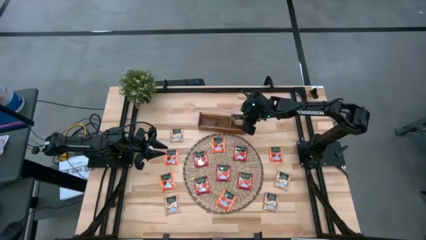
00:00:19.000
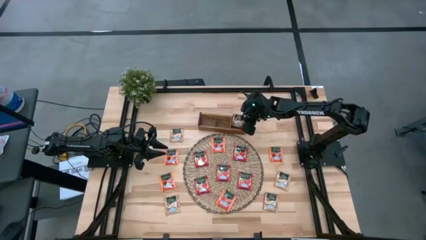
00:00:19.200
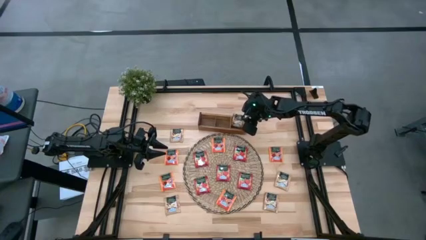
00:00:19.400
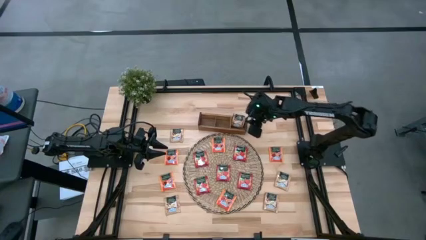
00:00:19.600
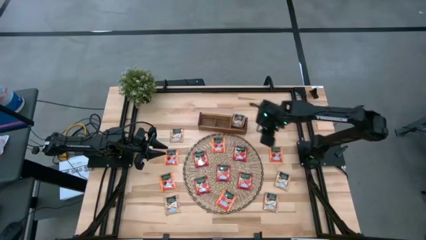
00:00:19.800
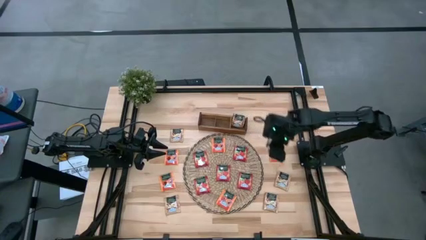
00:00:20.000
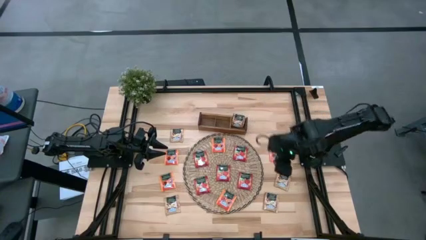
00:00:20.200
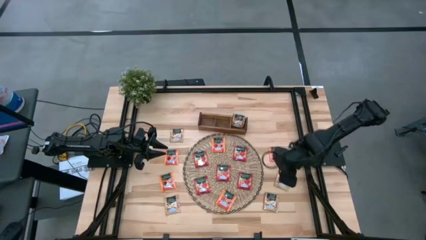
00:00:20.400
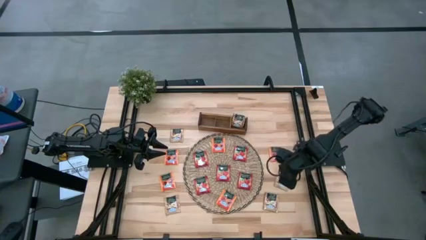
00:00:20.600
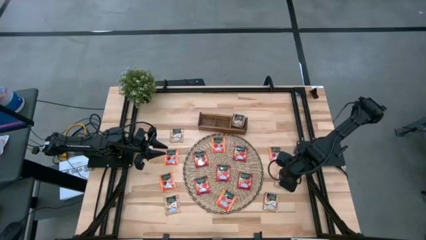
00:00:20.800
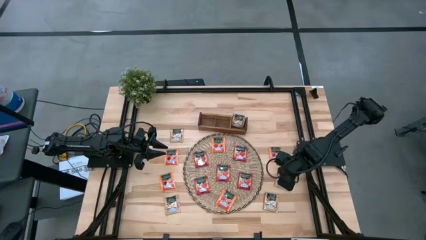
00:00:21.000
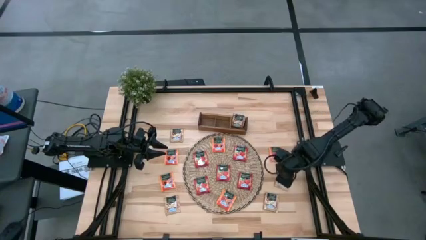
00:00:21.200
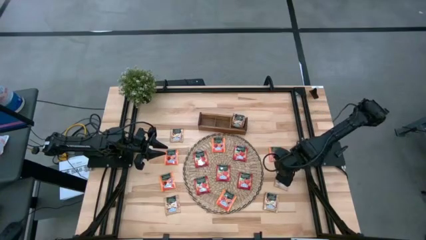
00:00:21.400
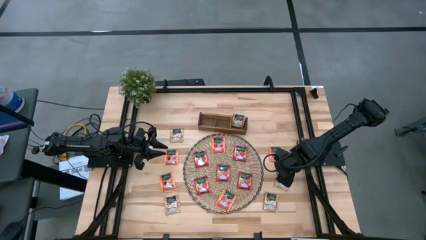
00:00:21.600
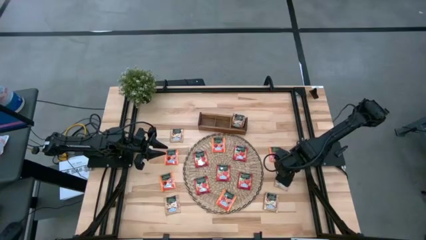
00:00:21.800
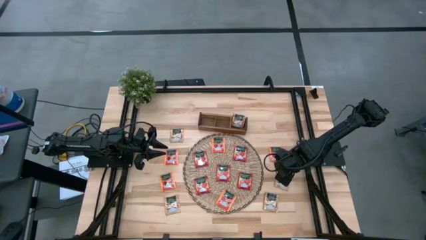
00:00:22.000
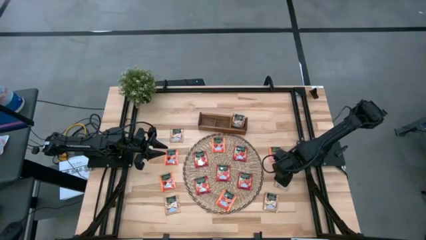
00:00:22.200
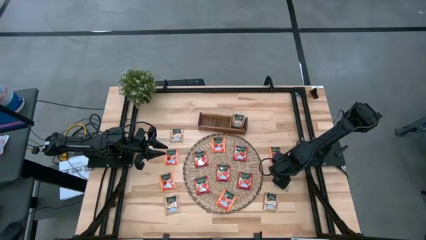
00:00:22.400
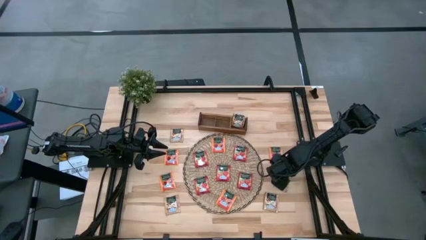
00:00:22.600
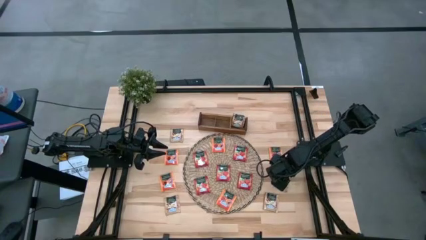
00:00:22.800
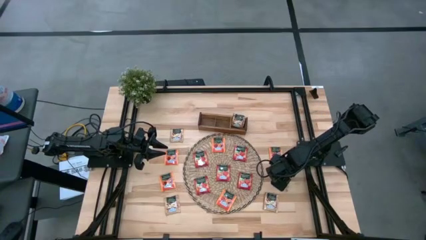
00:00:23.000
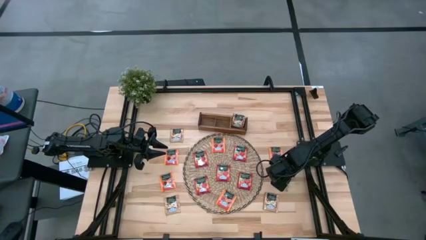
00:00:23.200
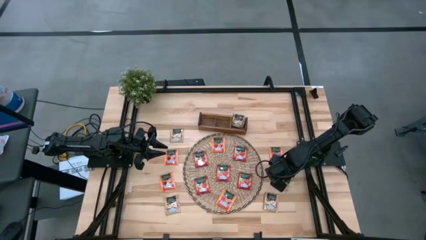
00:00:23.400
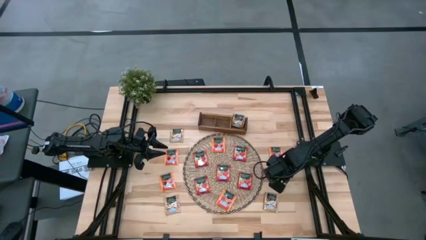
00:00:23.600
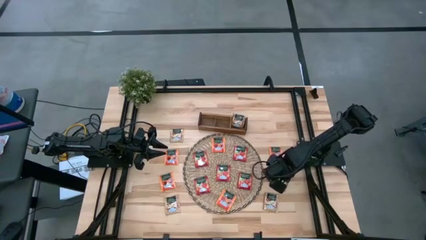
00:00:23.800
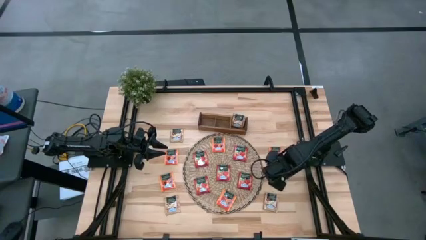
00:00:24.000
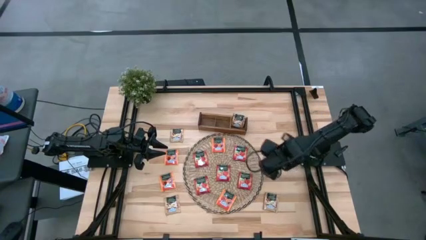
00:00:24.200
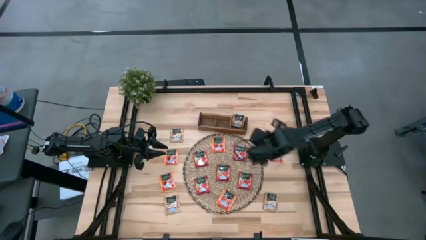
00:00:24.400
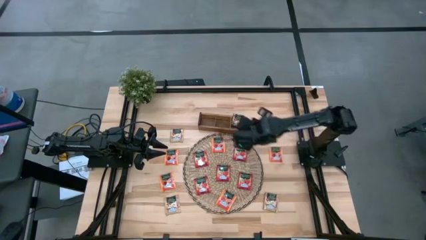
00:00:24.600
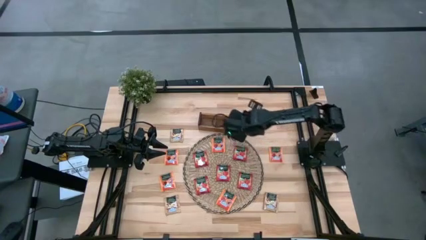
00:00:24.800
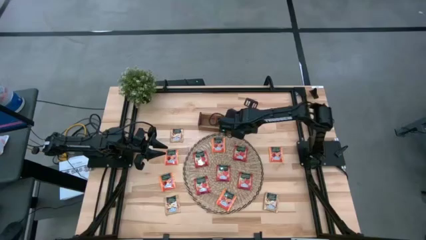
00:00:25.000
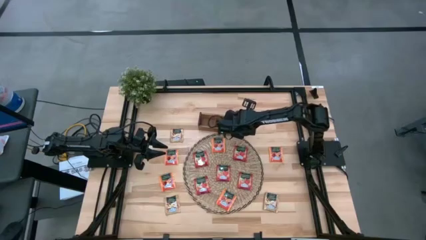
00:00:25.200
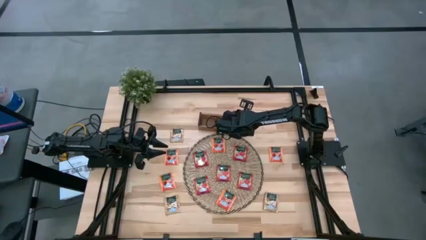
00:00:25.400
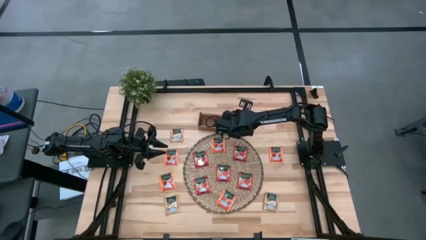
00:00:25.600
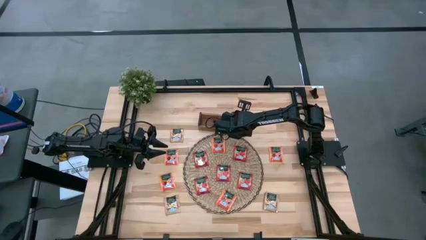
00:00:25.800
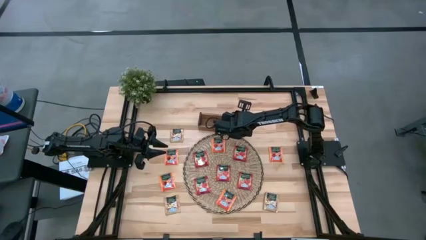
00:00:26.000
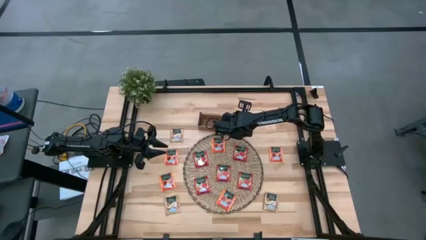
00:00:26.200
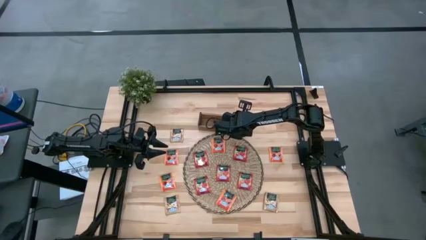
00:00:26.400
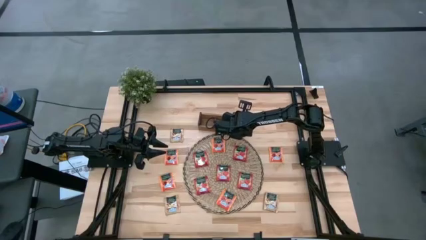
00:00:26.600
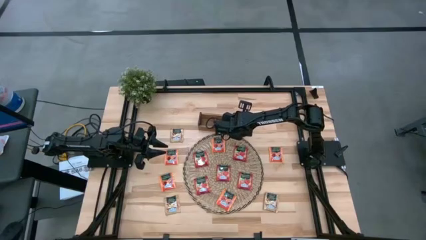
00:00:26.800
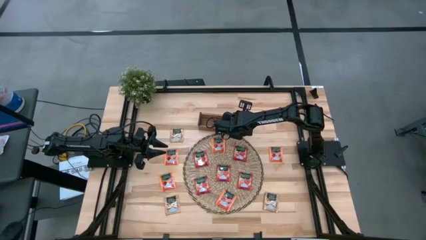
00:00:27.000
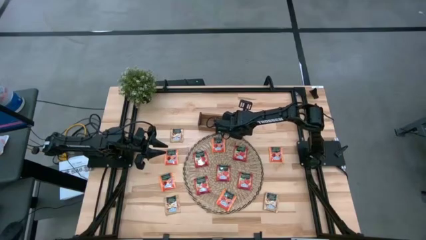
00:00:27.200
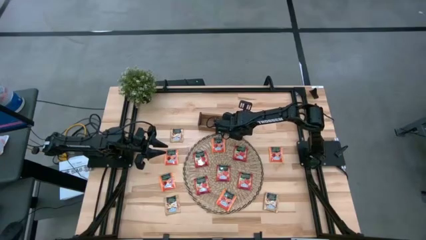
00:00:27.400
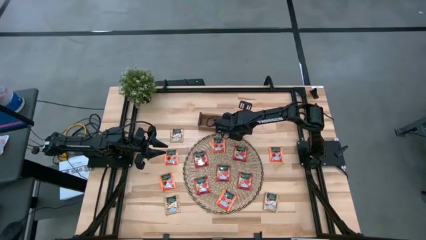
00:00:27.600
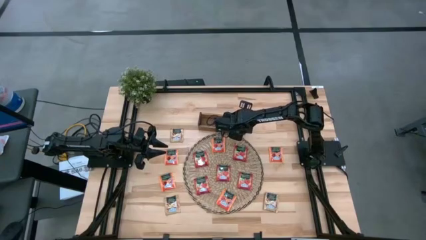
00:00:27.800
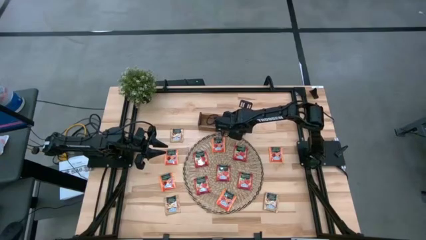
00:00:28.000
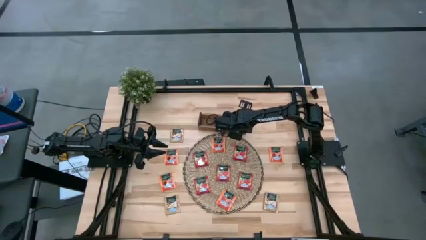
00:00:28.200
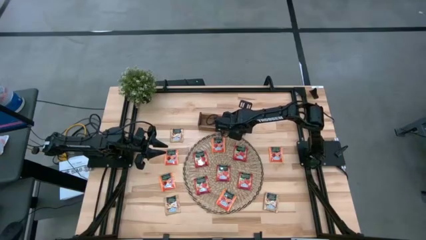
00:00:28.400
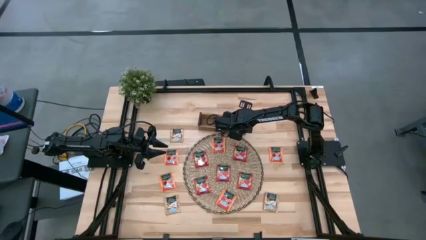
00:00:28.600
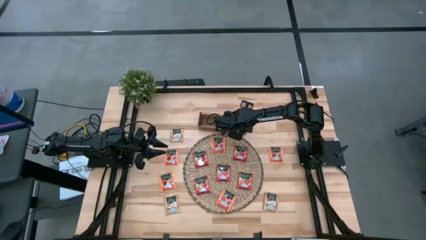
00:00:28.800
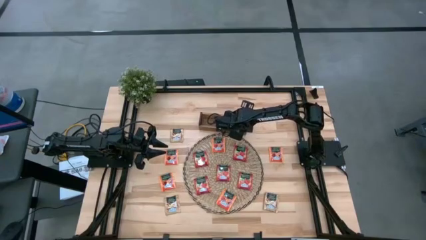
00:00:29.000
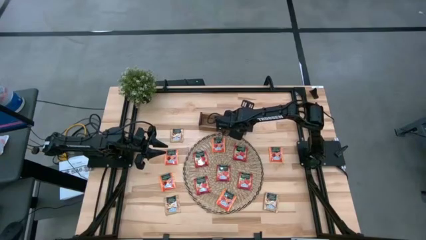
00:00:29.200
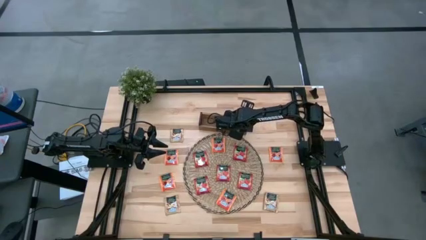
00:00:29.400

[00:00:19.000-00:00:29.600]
Task: Pick & Place Tea
Put the brown tea bag into the right section of the wooden organizer

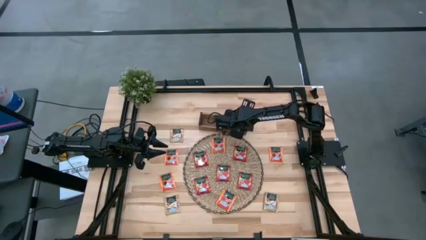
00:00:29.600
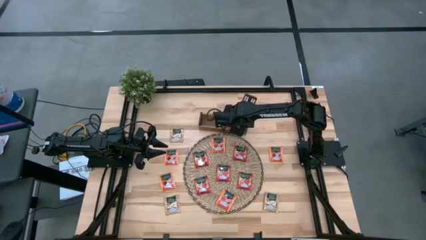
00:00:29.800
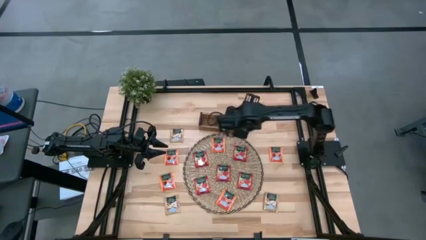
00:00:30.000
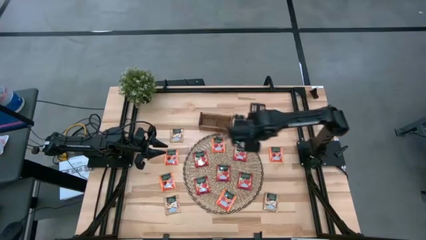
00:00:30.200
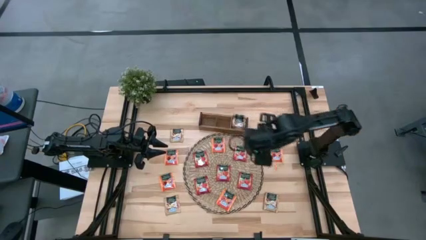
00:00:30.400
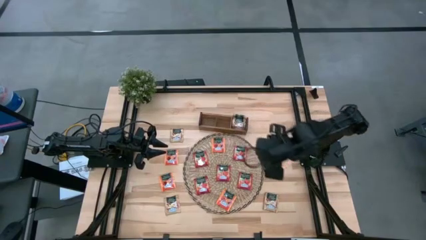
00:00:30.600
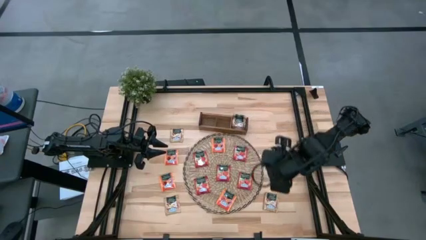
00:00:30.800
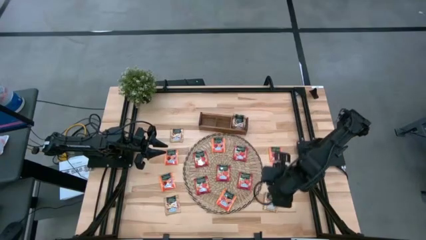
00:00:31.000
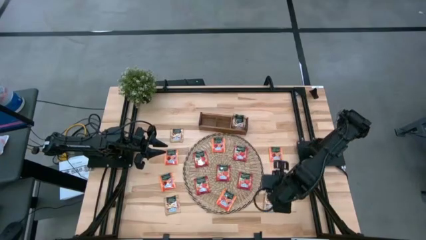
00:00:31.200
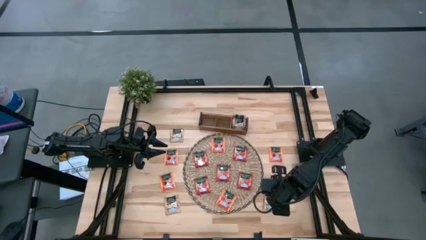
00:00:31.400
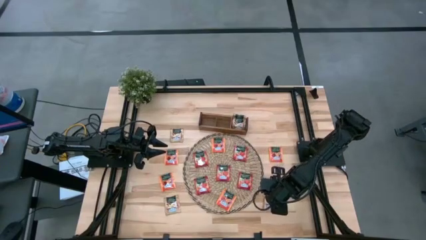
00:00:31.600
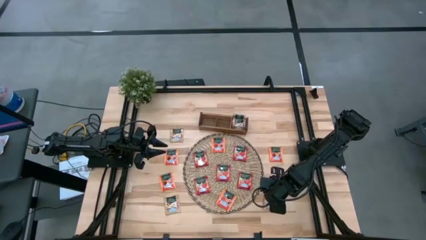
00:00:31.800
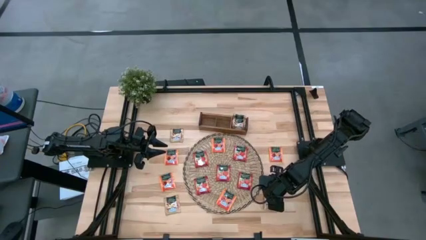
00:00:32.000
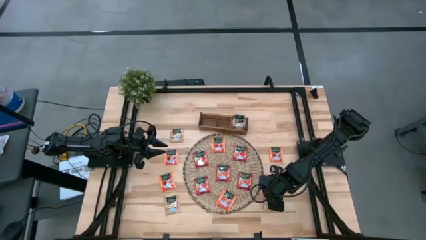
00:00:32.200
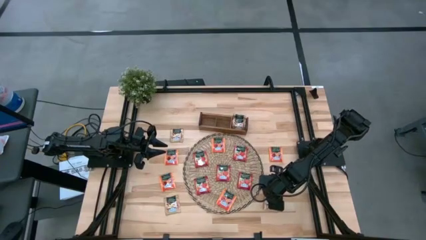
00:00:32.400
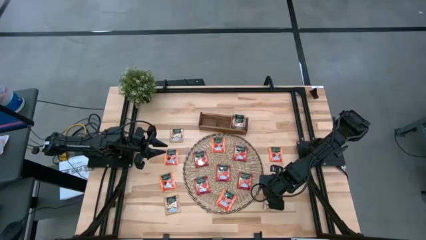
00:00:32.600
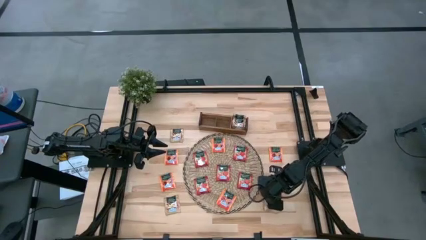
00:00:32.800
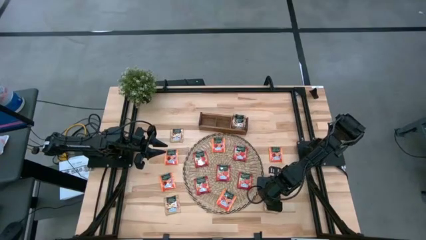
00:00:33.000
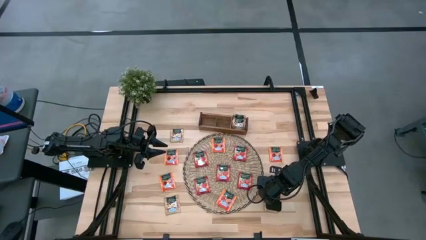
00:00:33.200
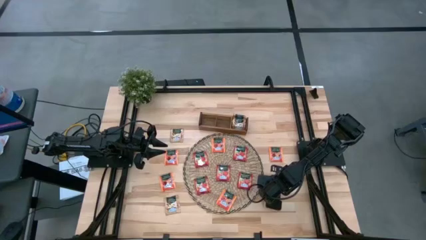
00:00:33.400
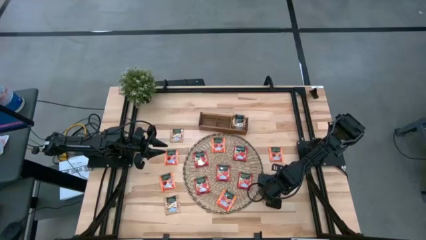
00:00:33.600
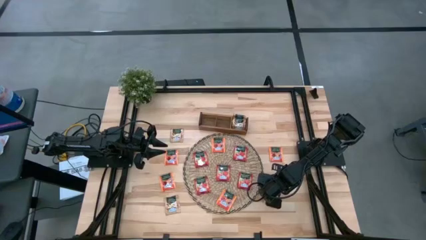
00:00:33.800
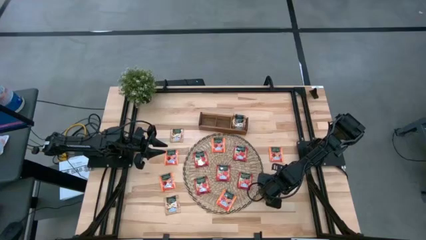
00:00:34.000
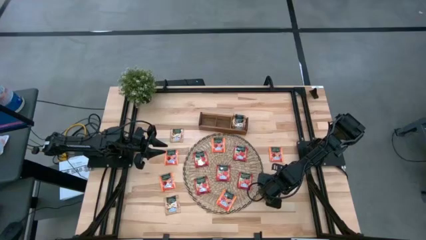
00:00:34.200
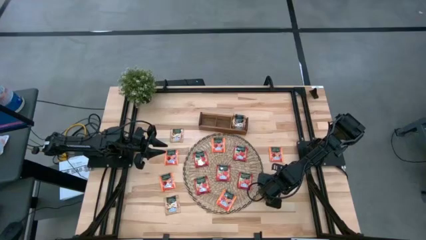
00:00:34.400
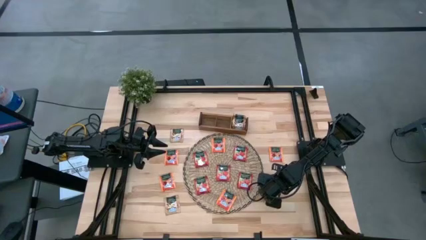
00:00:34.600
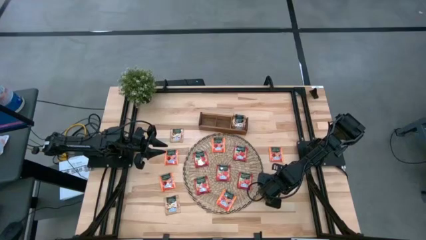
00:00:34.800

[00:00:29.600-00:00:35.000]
Put the brown tea bag into the right section of the wooden organizer
